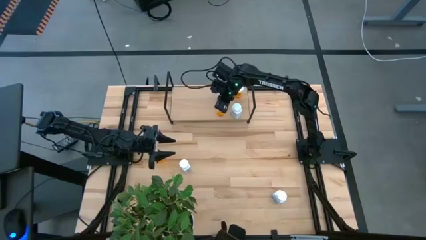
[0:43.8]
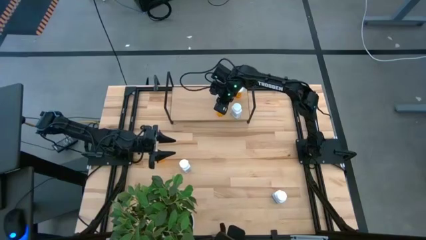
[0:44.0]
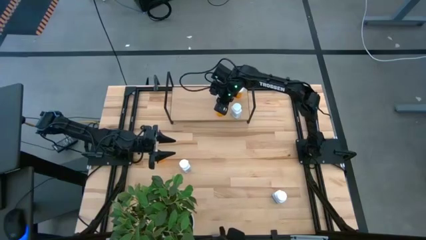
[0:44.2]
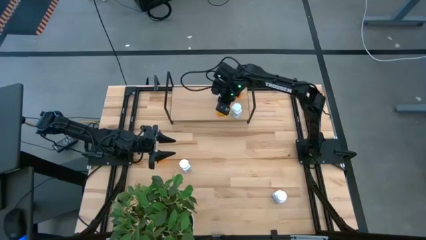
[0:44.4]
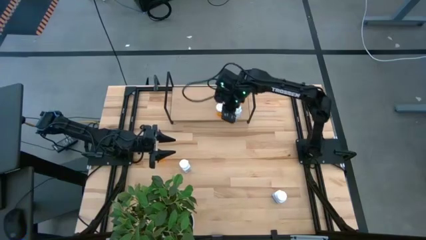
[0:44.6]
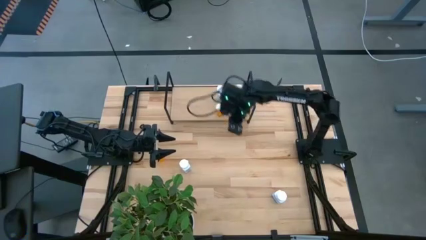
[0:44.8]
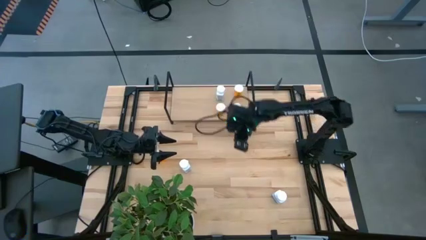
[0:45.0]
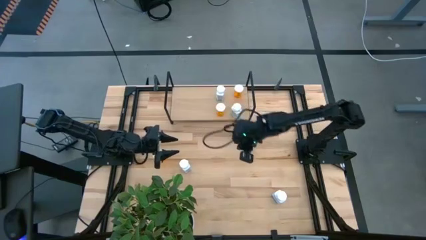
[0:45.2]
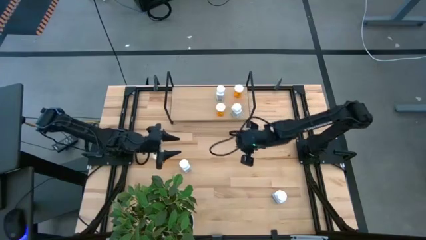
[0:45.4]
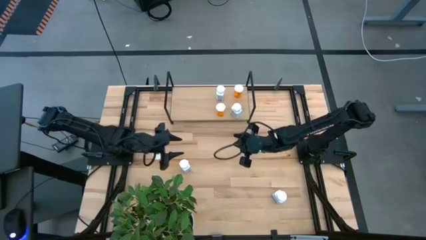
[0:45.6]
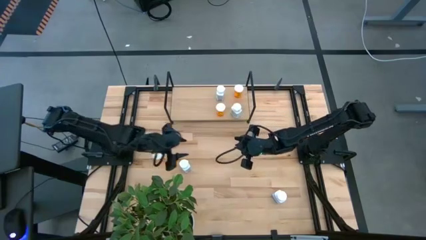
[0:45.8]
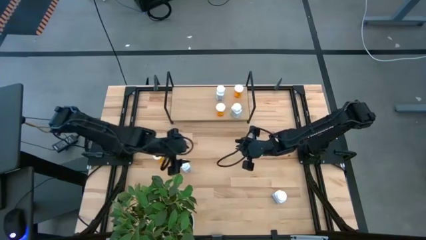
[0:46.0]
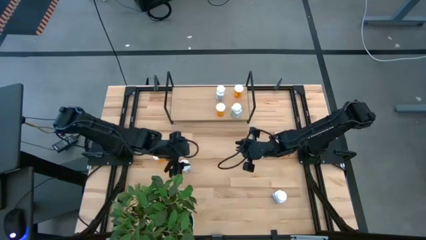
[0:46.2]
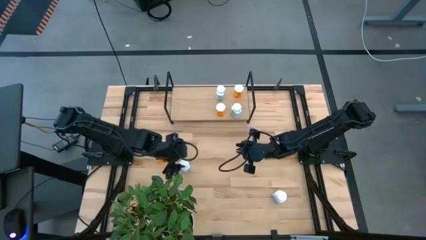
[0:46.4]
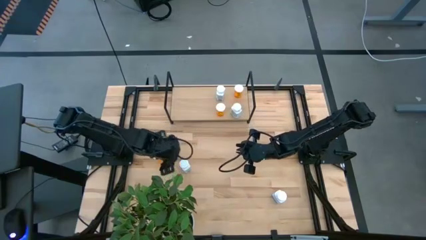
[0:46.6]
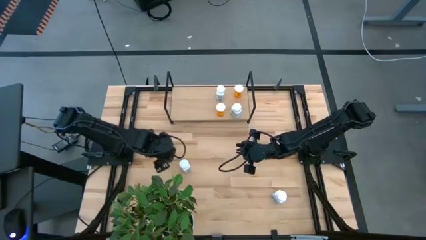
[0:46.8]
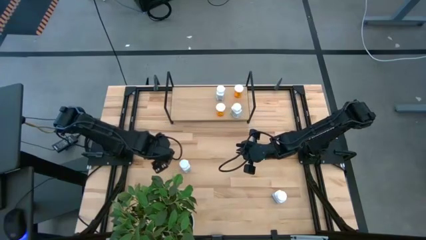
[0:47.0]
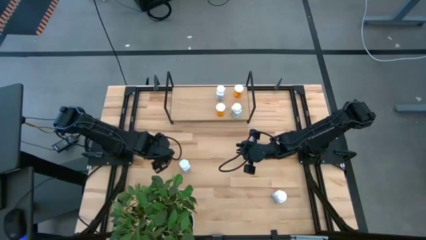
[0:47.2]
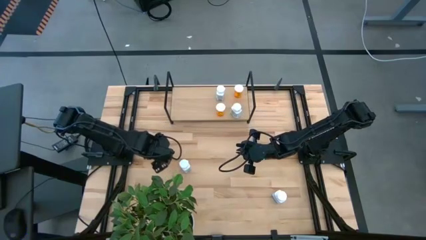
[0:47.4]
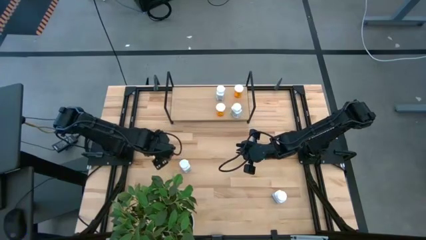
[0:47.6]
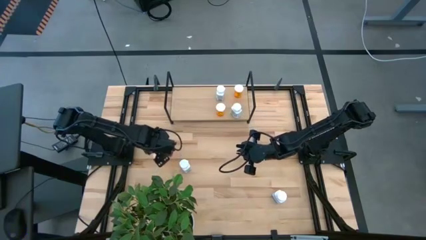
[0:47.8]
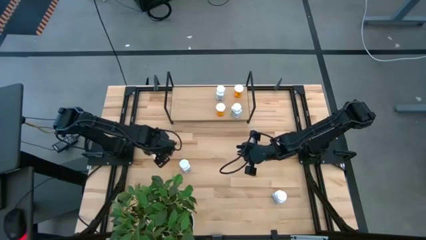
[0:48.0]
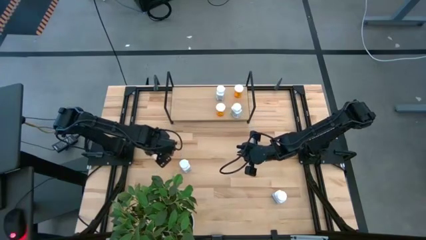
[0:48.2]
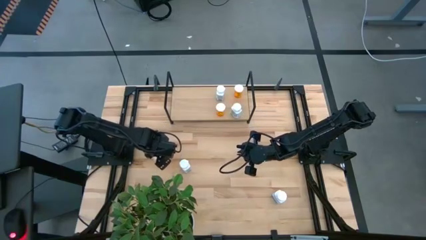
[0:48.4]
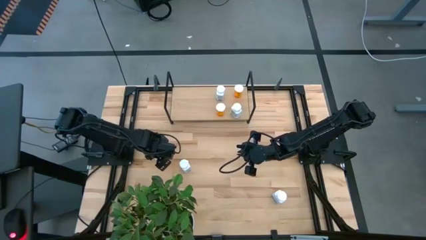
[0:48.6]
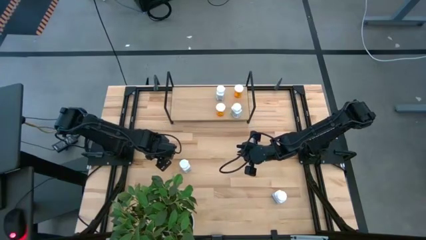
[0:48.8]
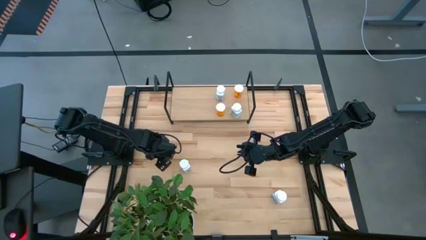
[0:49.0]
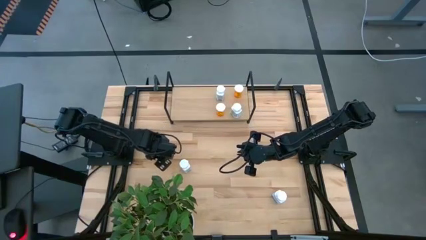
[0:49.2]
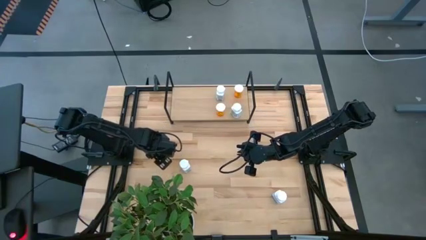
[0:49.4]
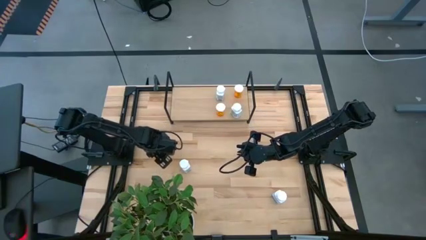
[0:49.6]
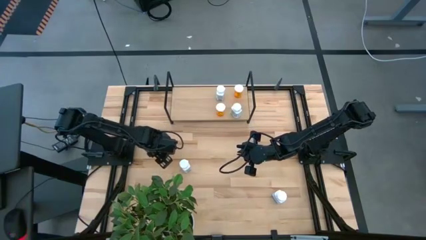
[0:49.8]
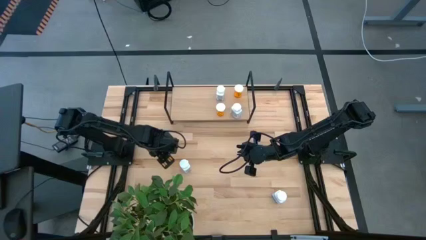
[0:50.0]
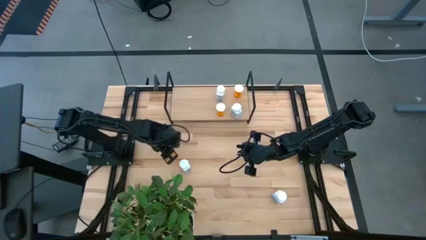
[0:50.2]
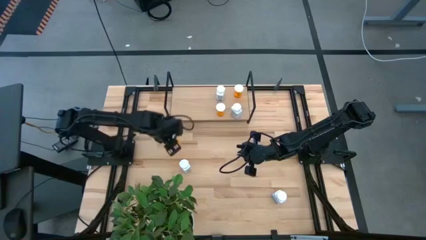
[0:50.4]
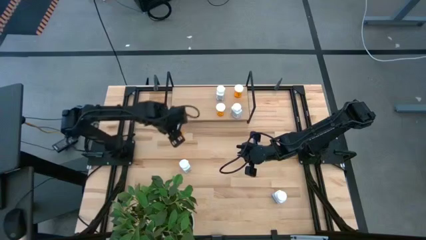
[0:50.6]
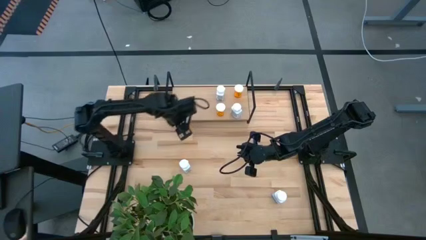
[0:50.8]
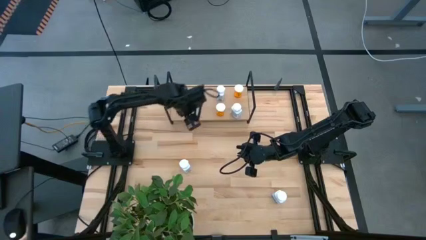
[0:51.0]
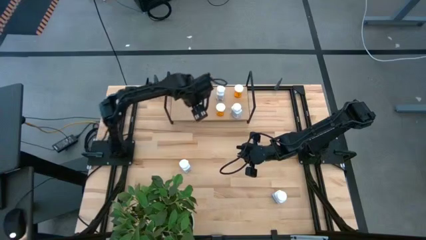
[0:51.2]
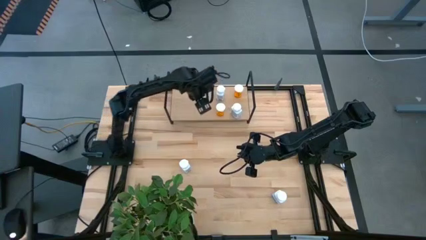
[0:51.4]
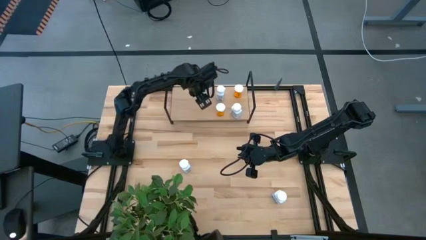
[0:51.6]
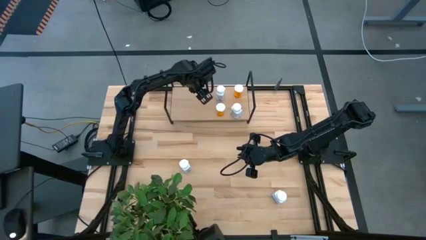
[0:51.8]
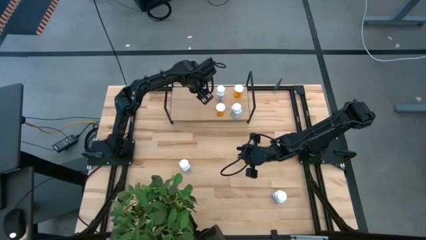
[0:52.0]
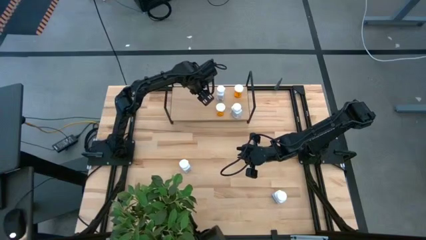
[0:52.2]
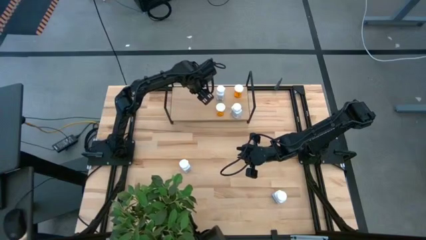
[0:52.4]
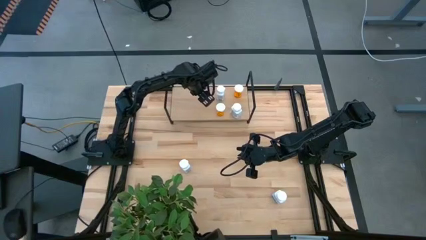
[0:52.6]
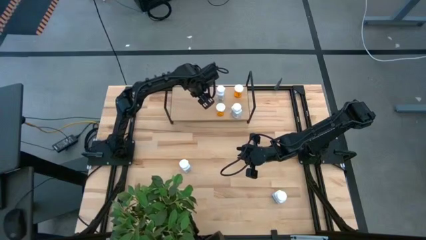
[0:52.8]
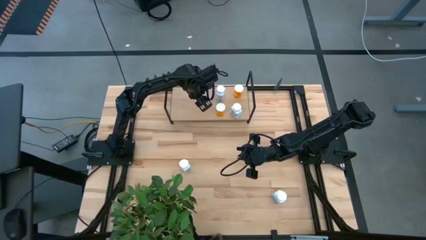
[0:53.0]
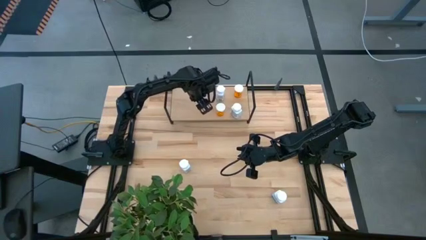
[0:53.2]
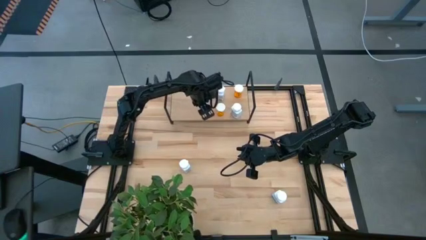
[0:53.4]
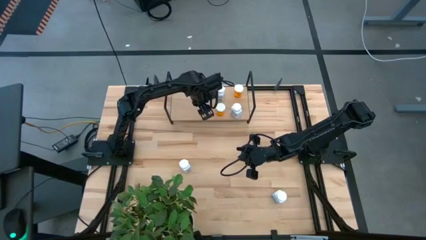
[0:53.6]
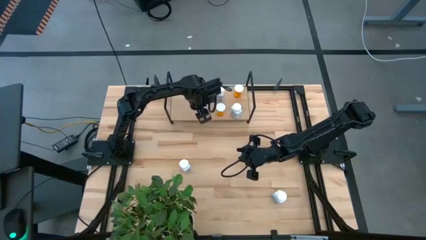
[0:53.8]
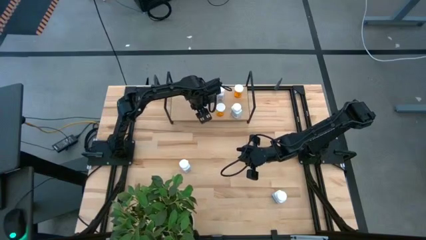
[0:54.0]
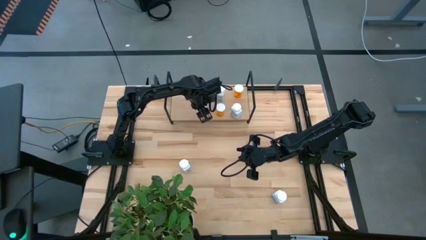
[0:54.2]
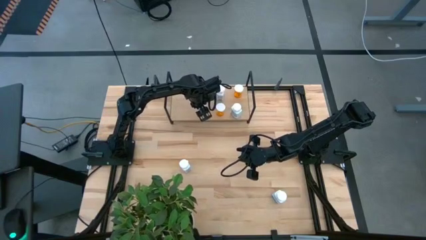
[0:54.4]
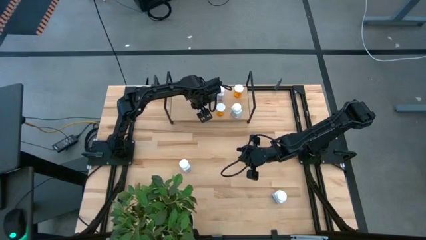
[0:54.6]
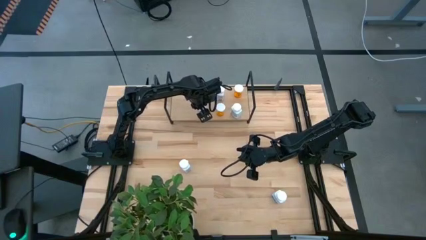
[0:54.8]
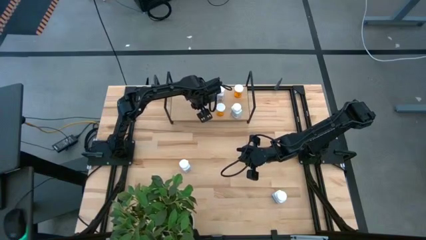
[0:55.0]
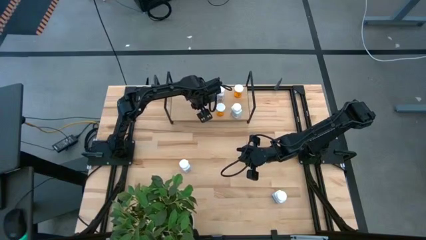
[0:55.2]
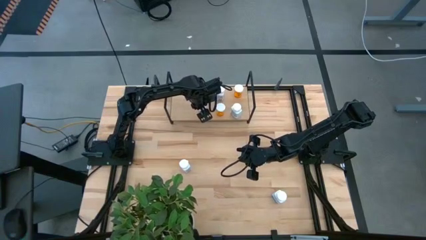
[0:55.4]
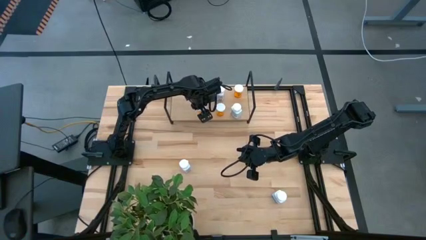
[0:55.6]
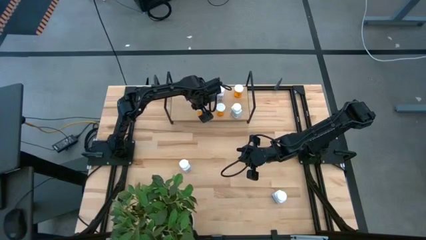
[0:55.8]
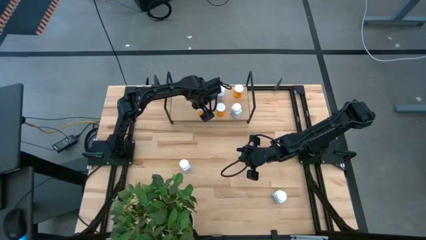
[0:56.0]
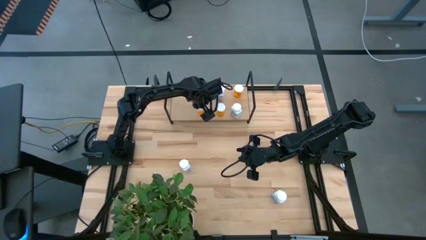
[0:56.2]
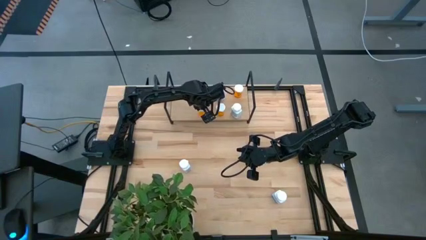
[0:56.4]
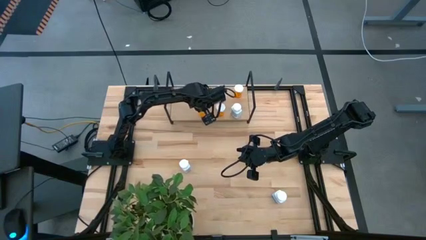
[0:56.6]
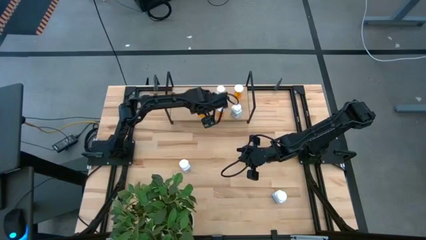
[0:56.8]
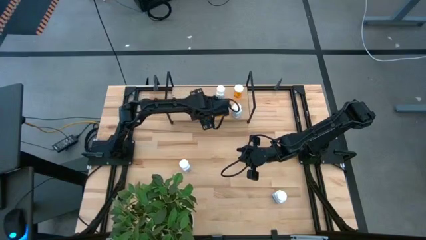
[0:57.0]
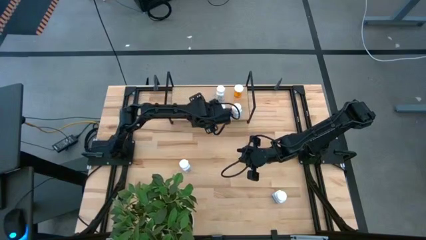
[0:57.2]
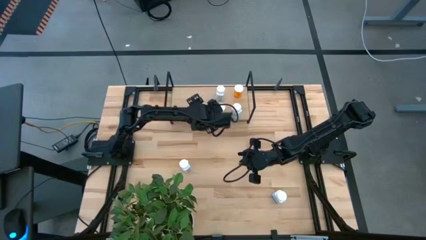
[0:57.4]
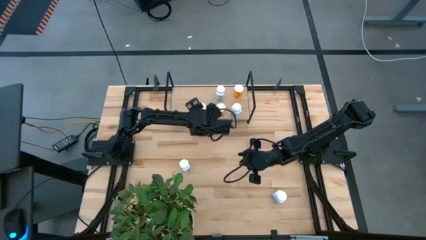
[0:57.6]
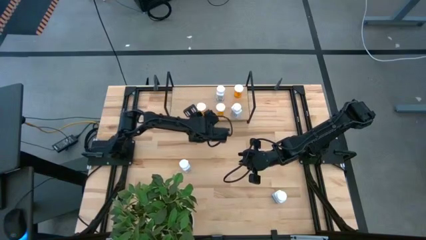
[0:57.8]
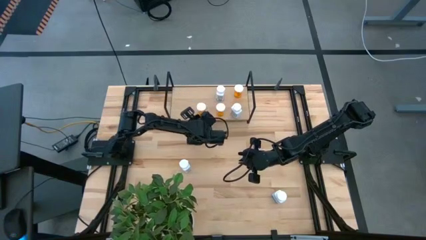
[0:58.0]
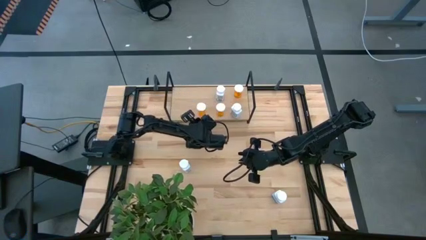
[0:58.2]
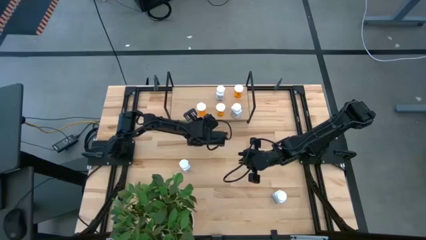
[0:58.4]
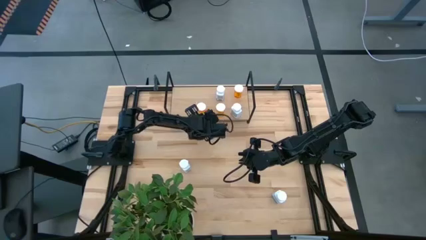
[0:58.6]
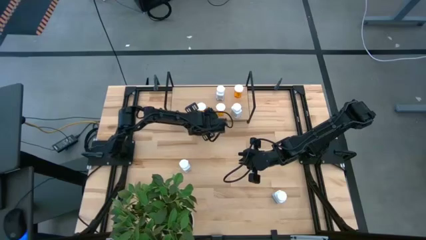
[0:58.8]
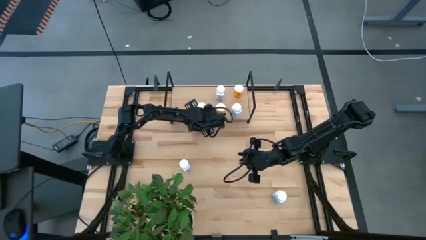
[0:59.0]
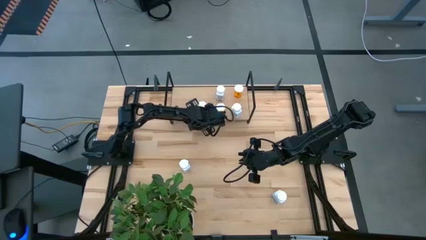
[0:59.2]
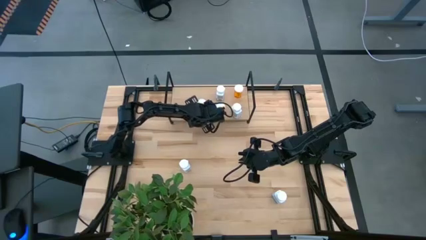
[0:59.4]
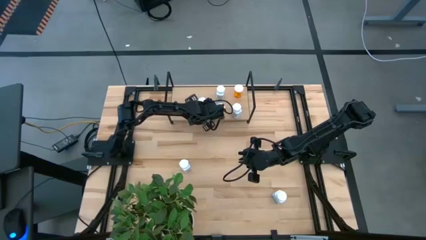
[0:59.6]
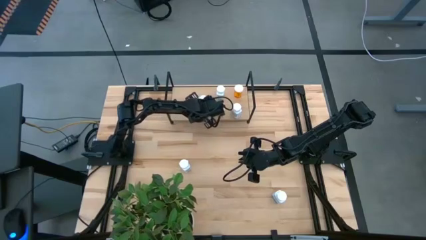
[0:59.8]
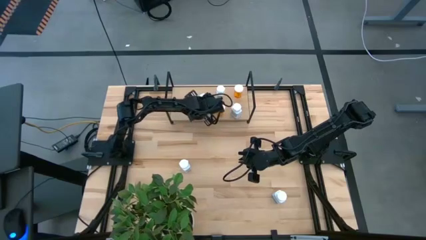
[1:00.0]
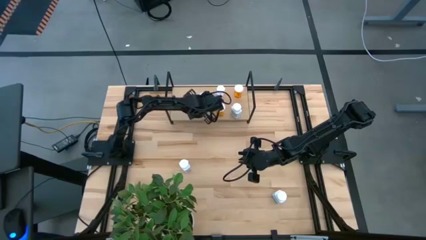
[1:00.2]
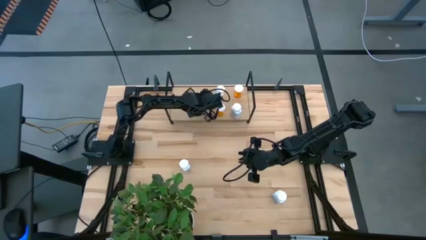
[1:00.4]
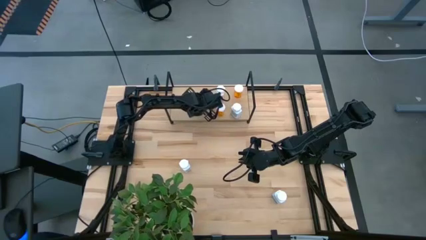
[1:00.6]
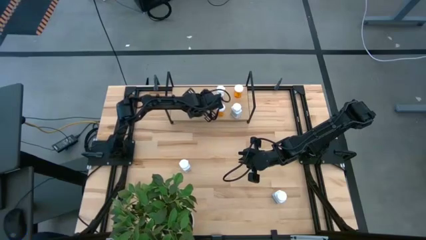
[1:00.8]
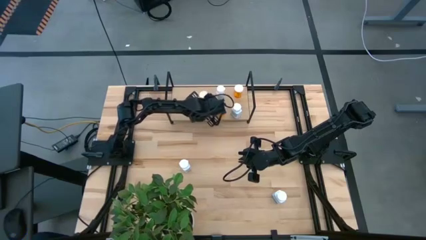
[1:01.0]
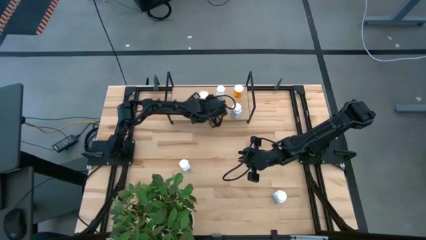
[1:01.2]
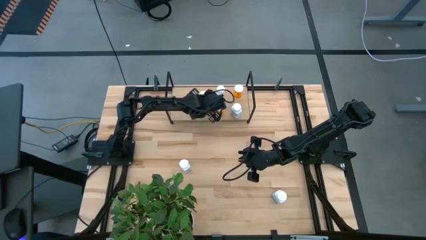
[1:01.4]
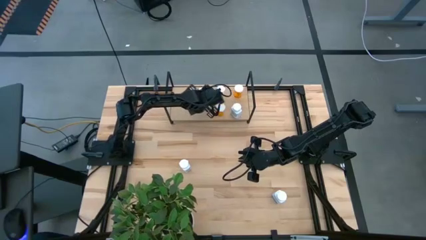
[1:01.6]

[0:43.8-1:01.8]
Task: Pick and place medicine bottles onto shelf by color
Put the orange pill bottle on the shelf
